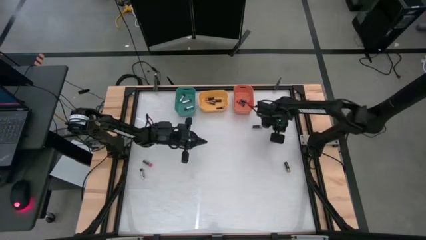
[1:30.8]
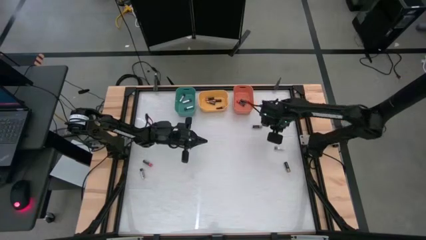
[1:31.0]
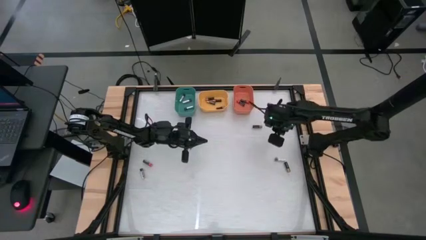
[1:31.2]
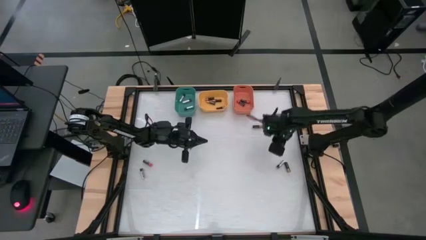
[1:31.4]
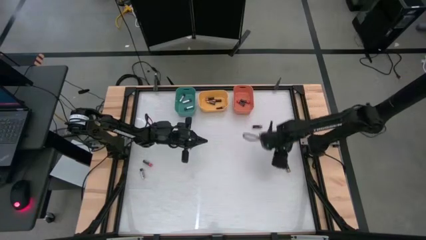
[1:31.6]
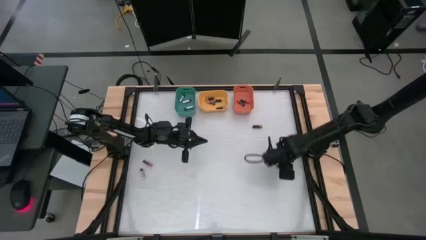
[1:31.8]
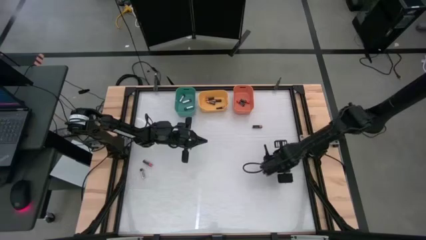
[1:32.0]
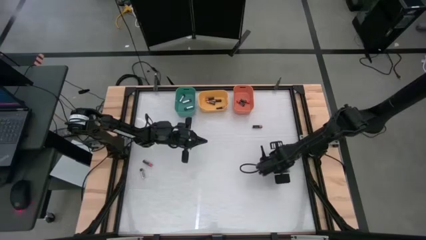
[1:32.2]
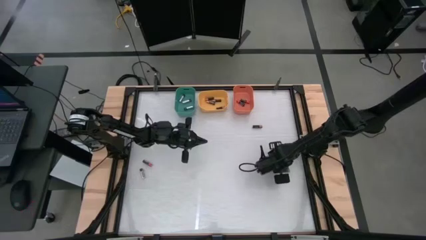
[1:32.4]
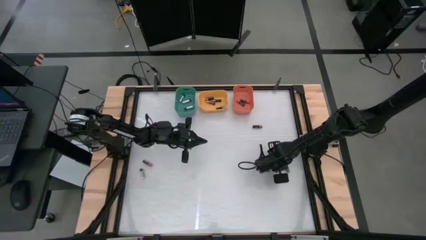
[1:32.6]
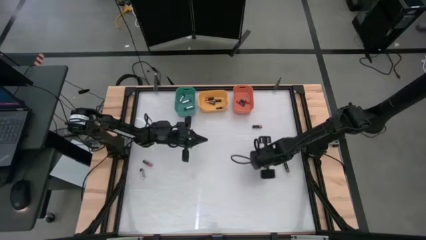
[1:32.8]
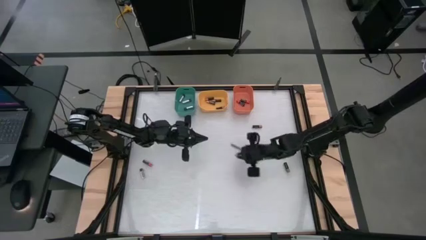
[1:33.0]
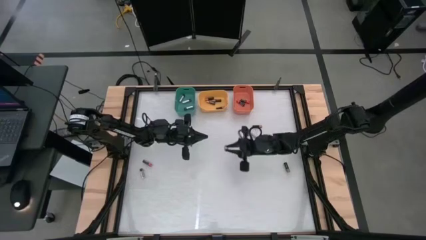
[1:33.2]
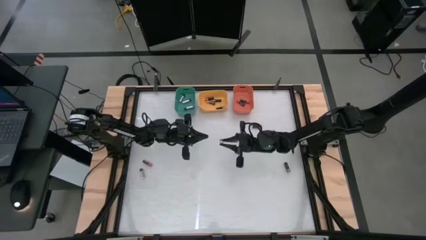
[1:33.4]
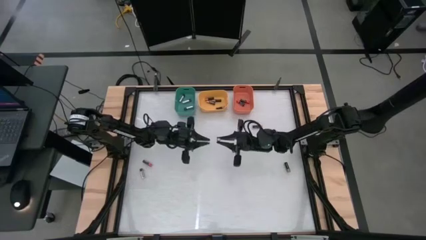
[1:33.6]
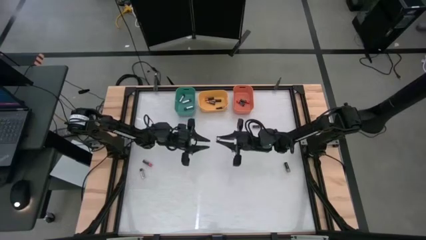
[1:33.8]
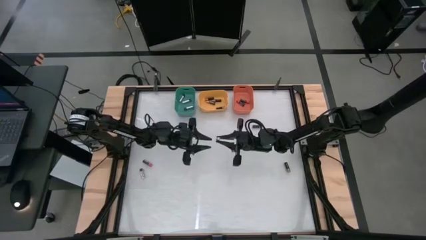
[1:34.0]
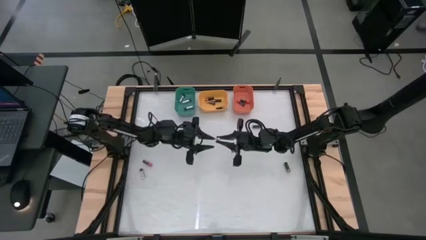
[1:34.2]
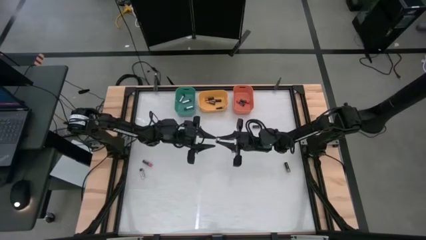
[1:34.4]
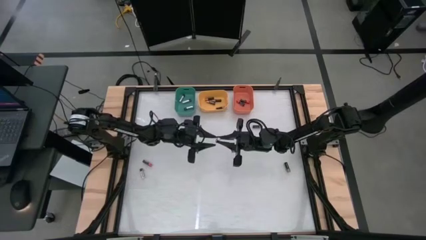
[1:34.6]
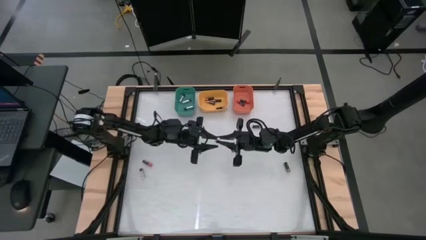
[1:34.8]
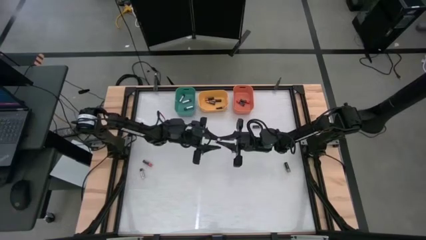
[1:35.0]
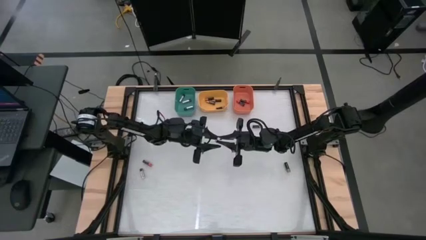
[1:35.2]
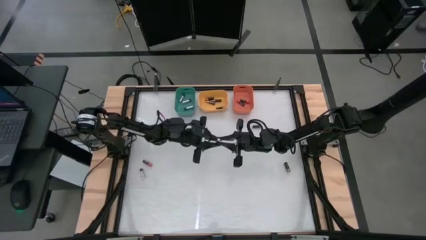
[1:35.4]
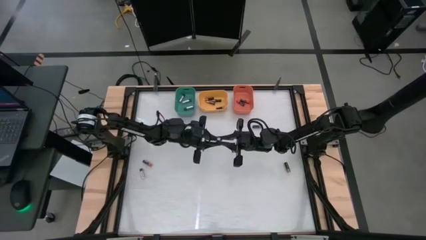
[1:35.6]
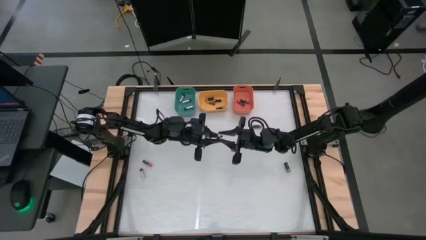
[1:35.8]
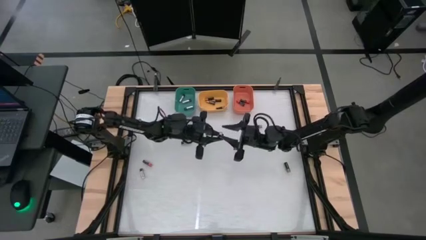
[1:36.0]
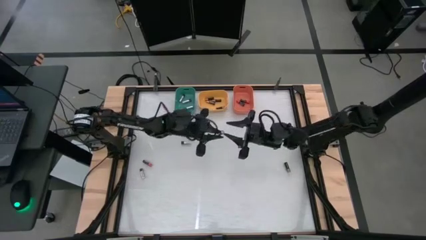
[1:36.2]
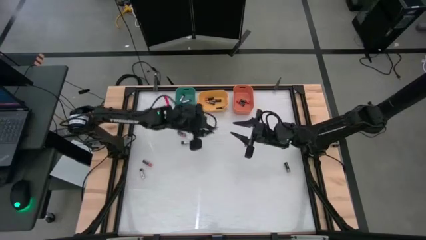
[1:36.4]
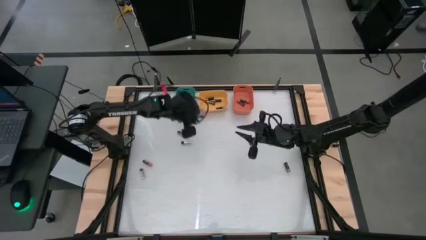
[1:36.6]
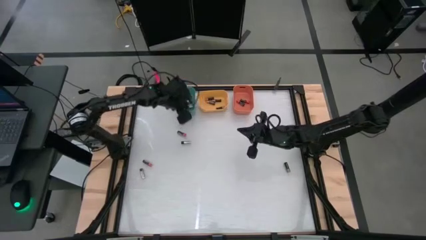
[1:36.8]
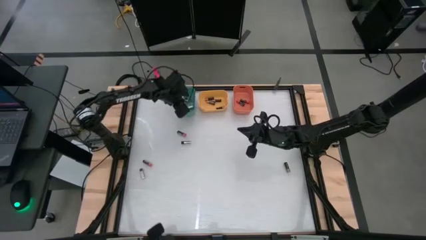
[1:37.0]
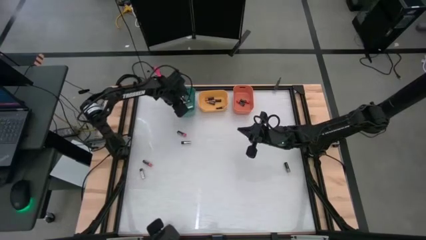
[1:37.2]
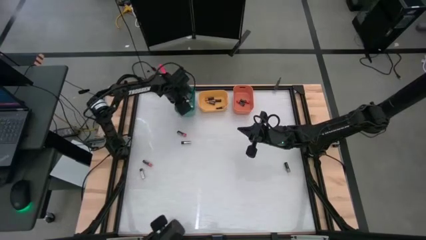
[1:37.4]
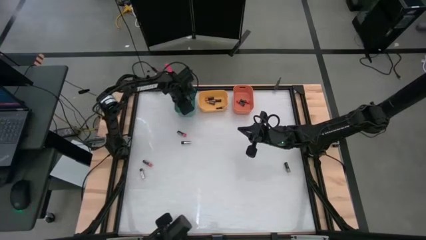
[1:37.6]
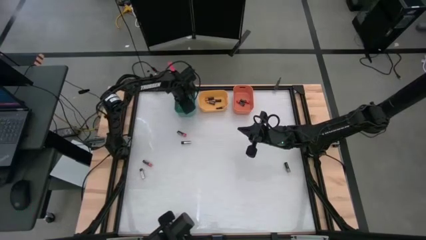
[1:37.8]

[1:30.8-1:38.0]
Task: Sort batteries
Put the silver battery into the green bin

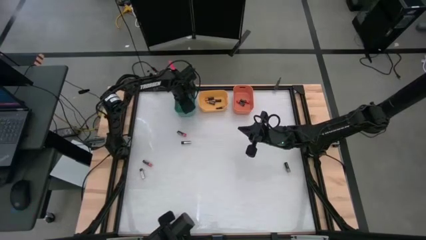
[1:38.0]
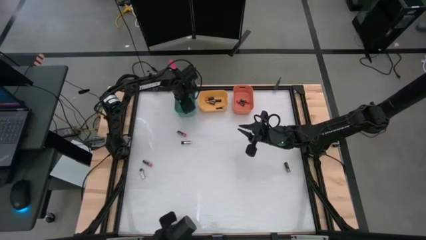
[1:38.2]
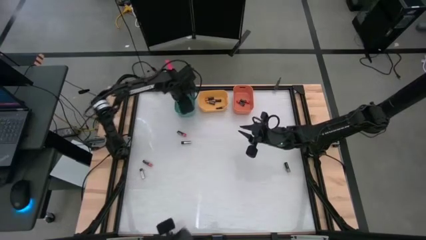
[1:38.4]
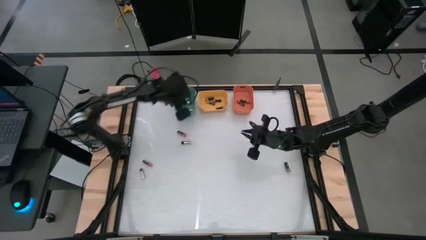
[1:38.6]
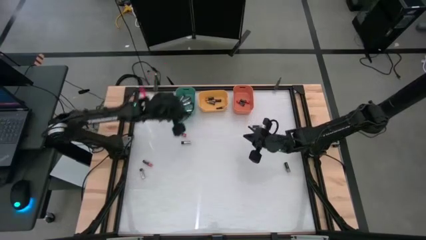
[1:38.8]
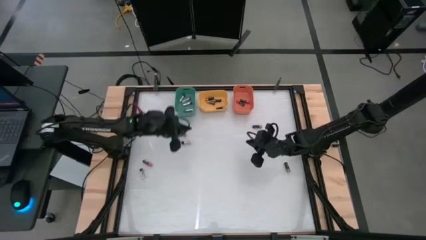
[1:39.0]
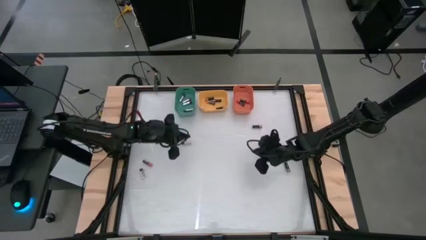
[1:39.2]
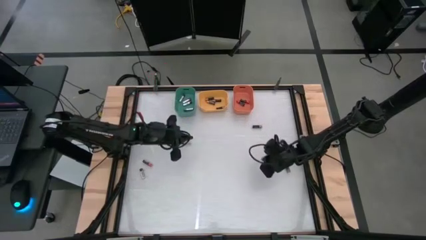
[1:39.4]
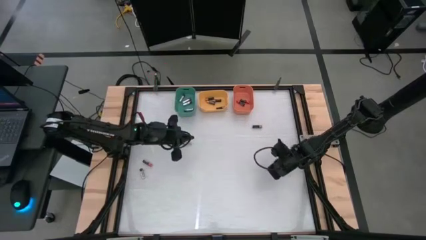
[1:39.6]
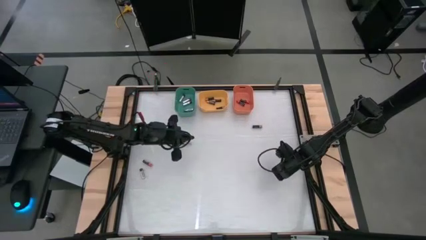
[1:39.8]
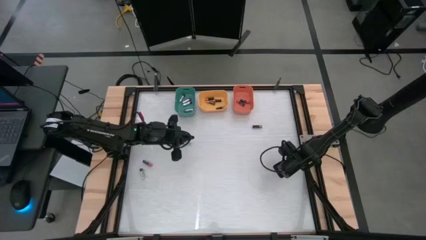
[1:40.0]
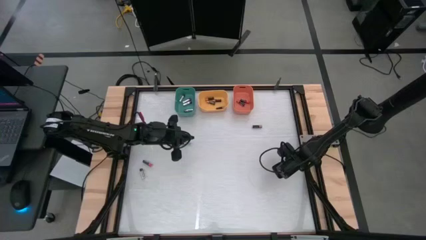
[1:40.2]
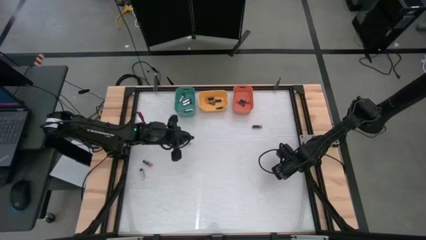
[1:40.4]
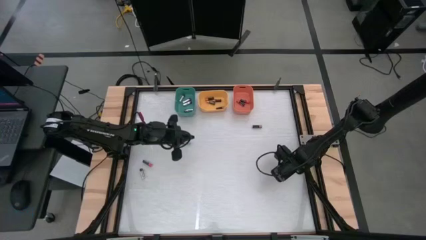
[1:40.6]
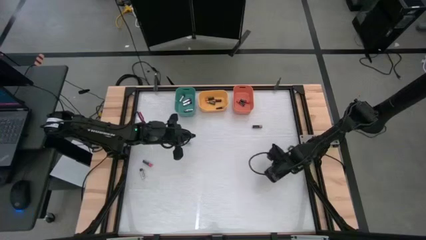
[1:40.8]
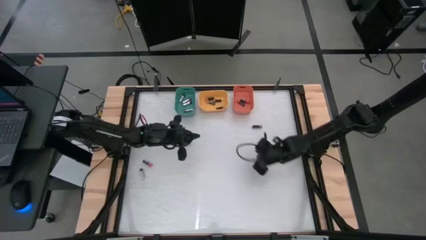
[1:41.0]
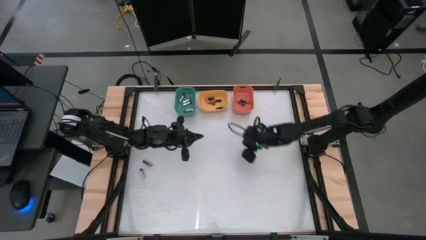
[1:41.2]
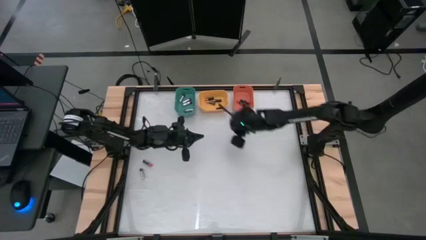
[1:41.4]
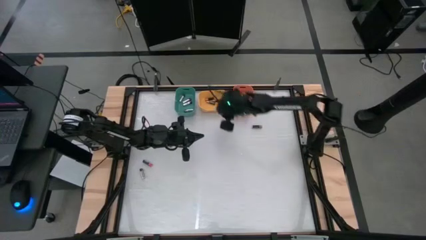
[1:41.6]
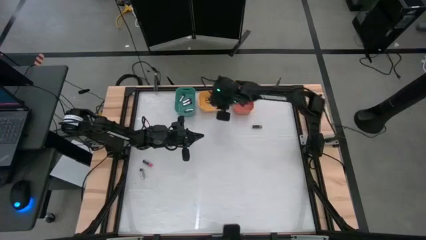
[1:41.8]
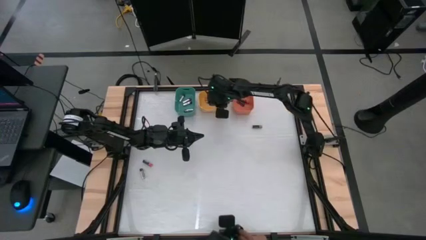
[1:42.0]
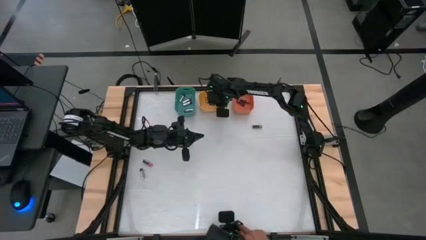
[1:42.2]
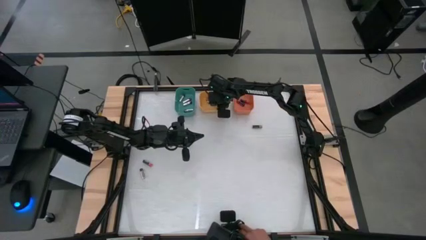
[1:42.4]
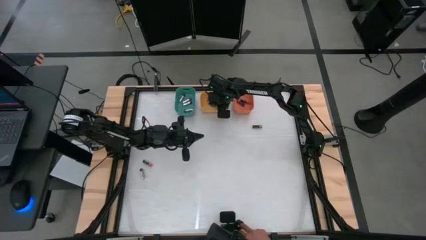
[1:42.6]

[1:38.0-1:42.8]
Put the brown battery into the yellow bin

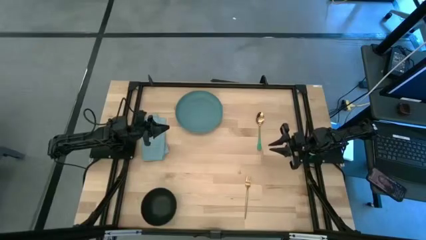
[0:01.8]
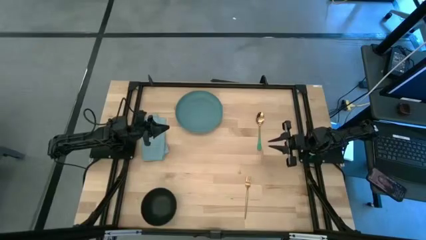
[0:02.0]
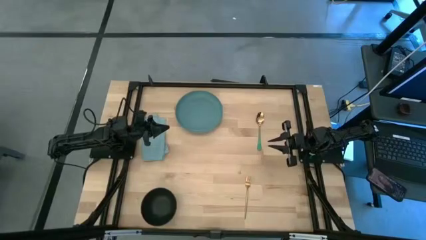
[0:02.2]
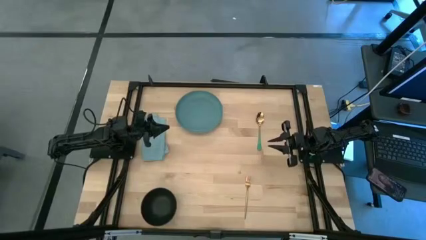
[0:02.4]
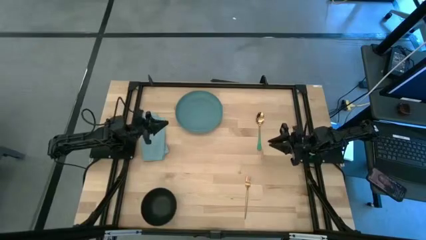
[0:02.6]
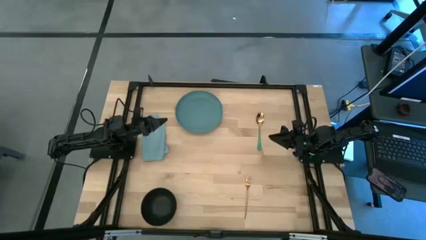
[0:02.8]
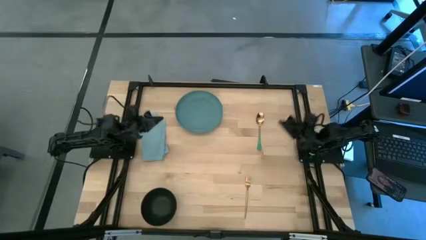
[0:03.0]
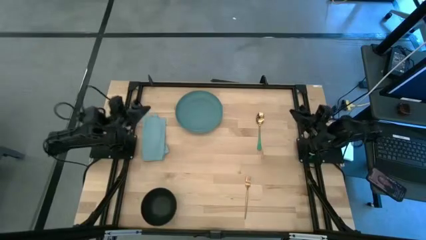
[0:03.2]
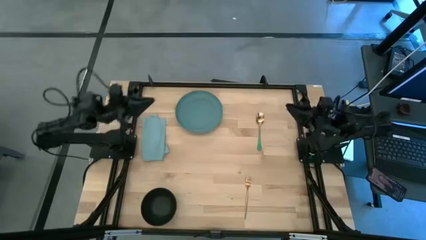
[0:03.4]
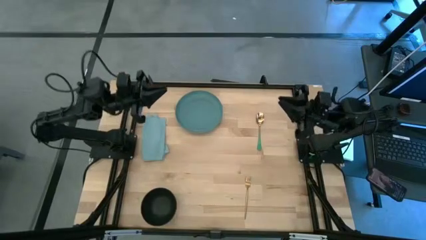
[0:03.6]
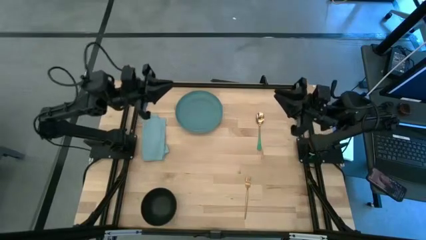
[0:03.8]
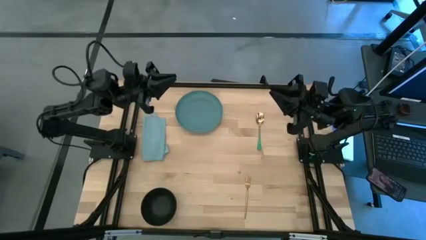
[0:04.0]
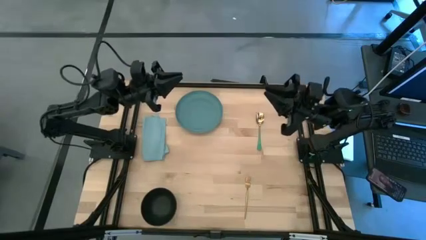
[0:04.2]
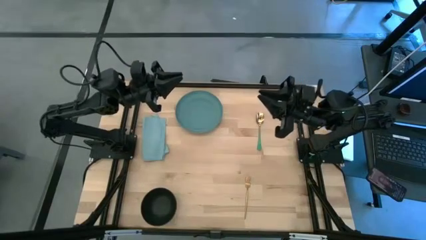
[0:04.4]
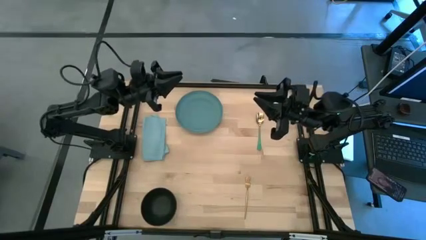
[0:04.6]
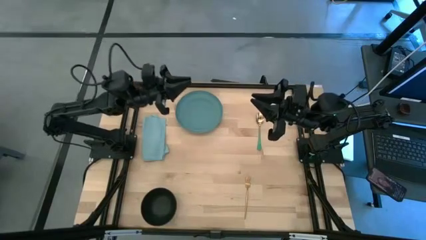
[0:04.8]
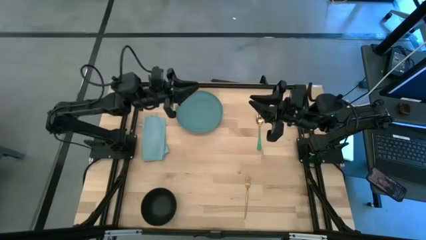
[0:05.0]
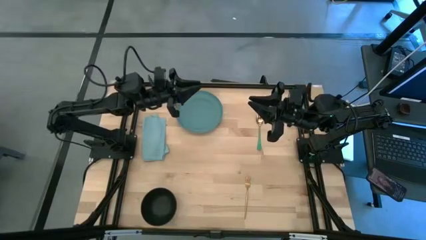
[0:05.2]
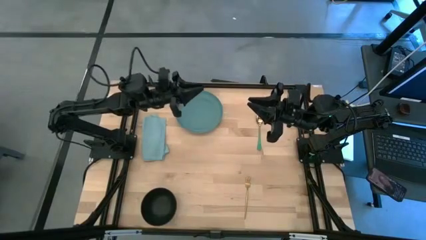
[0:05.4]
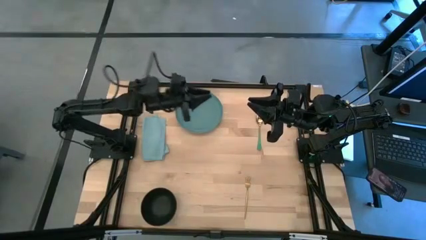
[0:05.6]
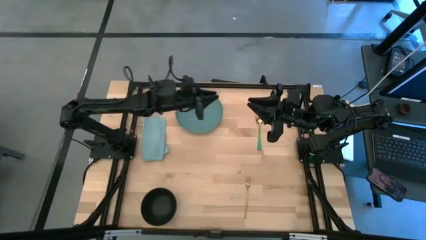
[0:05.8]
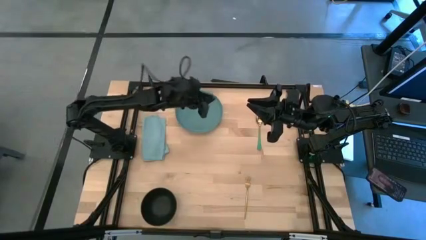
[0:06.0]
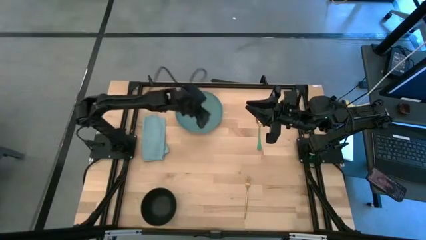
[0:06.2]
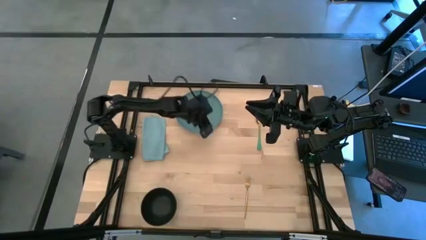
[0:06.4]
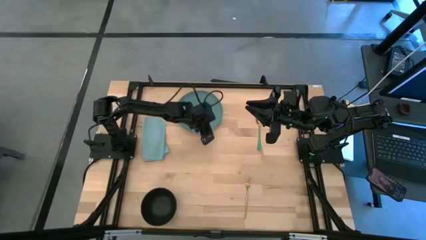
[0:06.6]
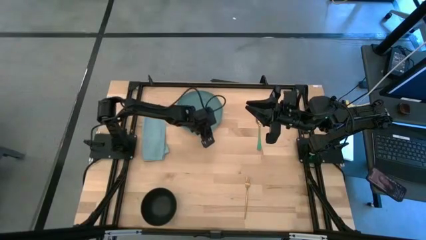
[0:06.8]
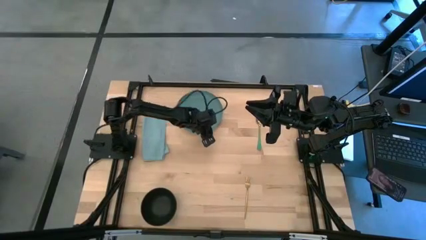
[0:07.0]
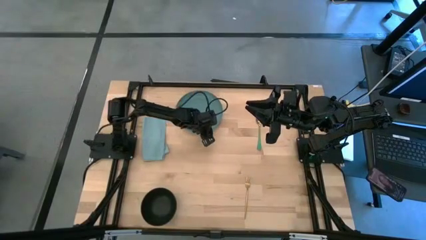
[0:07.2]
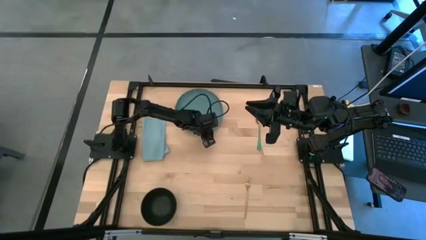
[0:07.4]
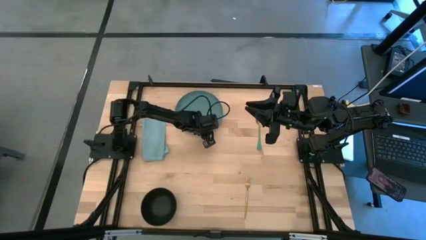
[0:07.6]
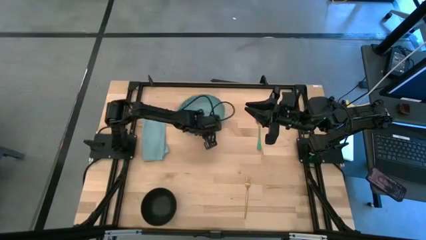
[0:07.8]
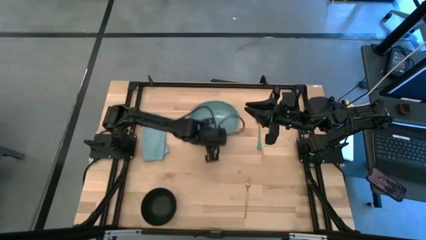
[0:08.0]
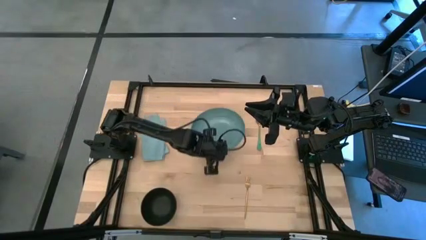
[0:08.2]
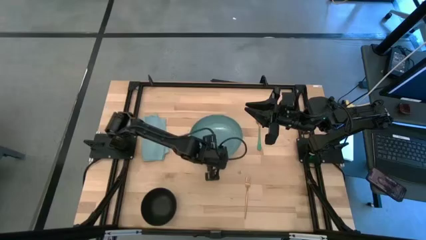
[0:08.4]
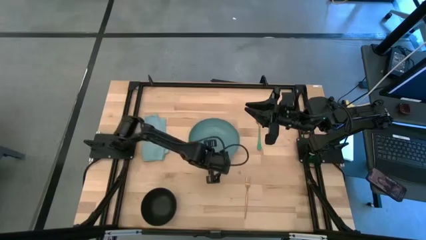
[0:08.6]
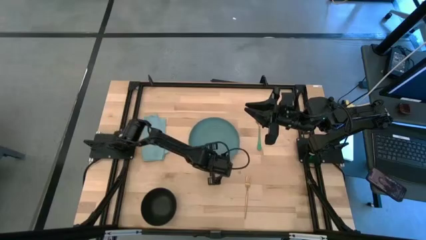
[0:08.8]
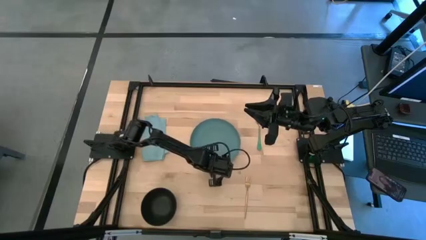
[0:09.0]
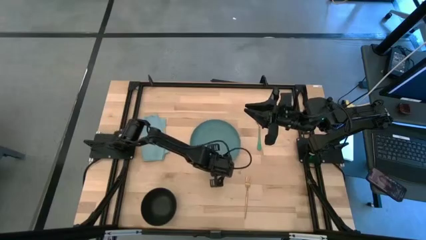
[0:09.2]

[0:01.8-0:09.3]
Task: Set table place
Prepare the green plate
